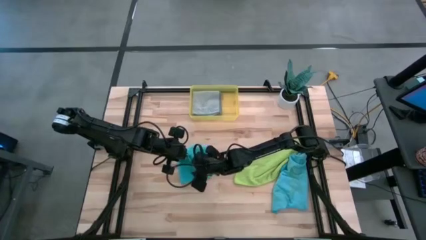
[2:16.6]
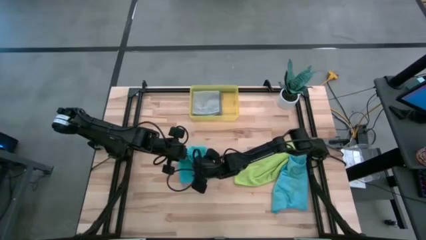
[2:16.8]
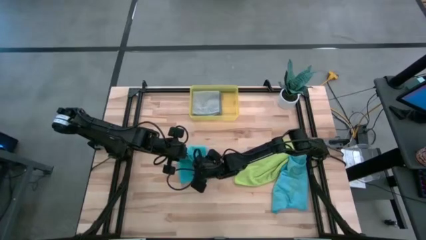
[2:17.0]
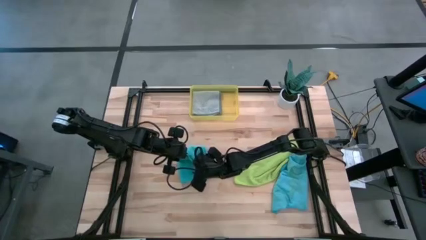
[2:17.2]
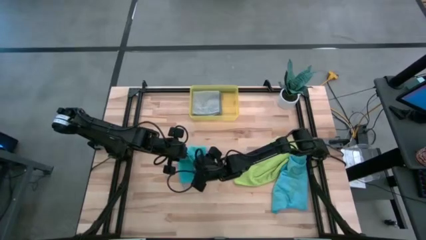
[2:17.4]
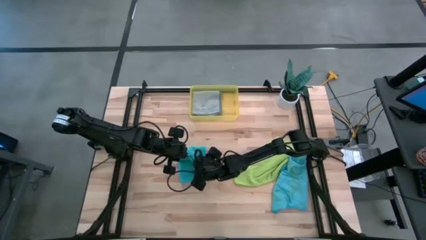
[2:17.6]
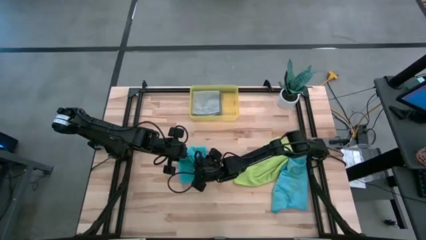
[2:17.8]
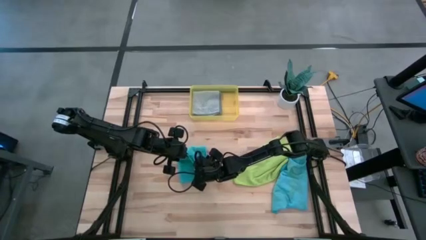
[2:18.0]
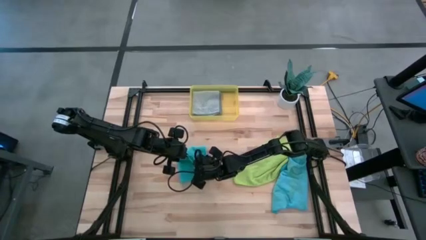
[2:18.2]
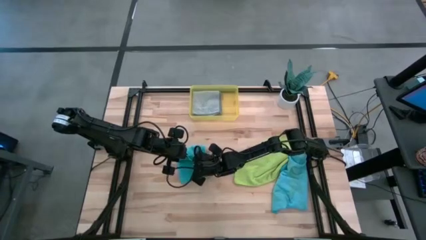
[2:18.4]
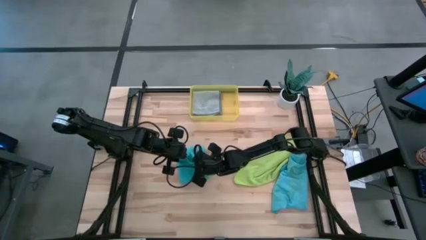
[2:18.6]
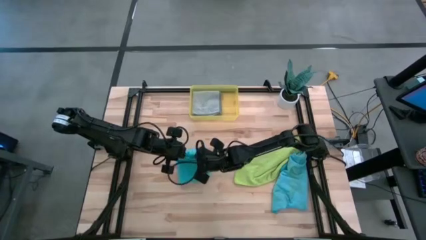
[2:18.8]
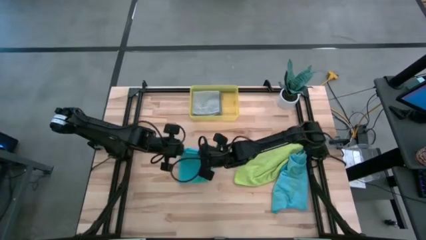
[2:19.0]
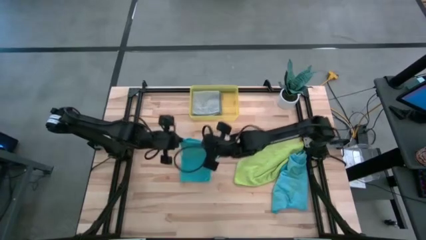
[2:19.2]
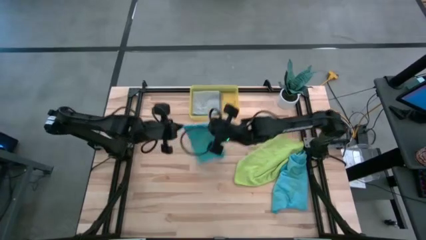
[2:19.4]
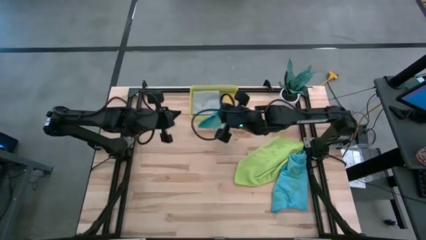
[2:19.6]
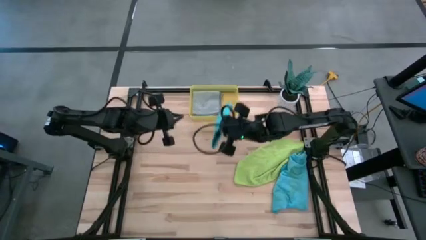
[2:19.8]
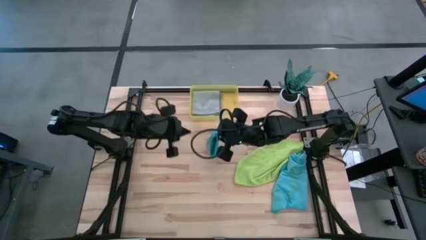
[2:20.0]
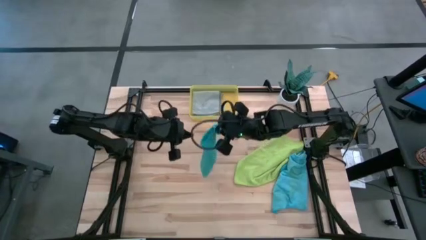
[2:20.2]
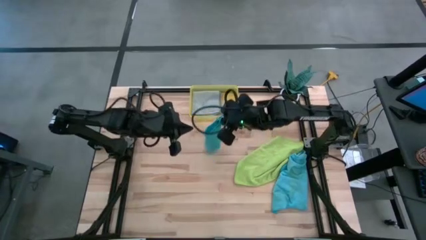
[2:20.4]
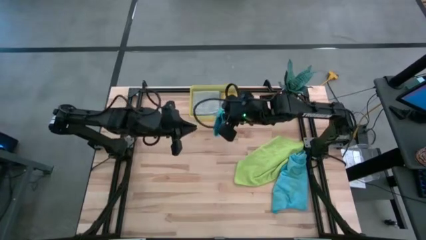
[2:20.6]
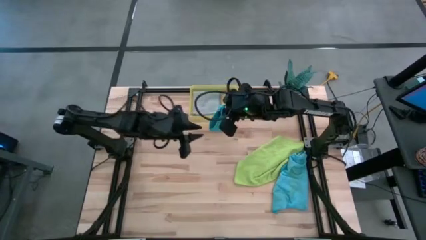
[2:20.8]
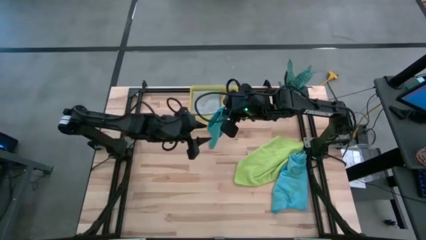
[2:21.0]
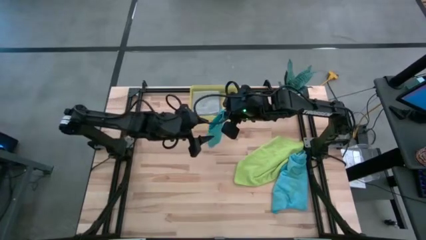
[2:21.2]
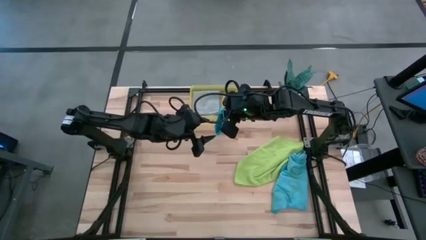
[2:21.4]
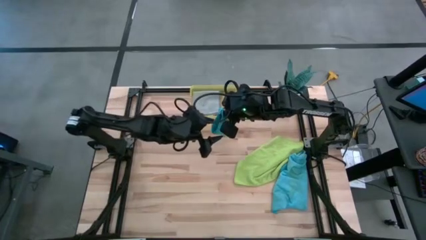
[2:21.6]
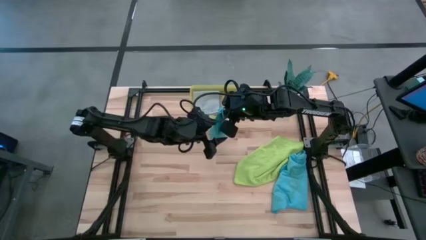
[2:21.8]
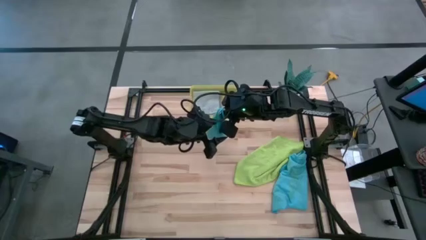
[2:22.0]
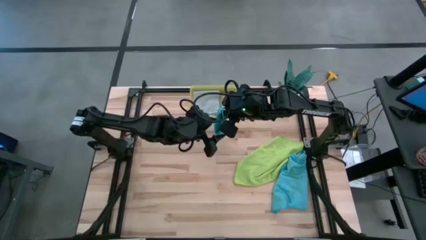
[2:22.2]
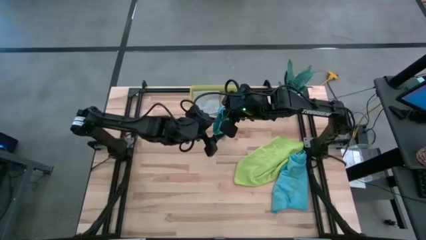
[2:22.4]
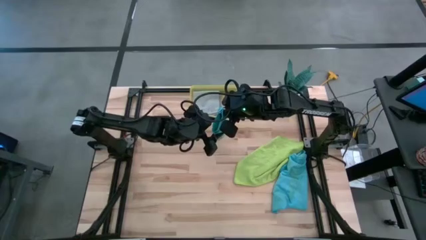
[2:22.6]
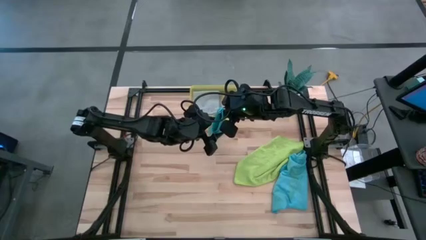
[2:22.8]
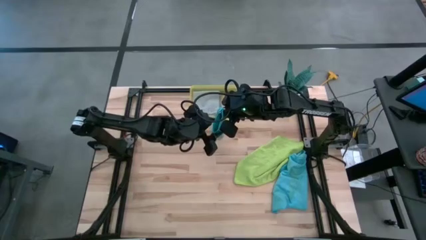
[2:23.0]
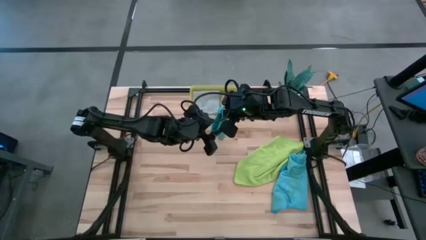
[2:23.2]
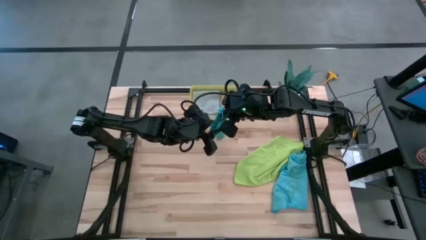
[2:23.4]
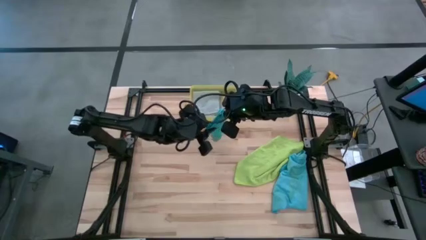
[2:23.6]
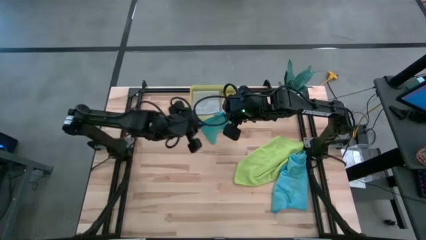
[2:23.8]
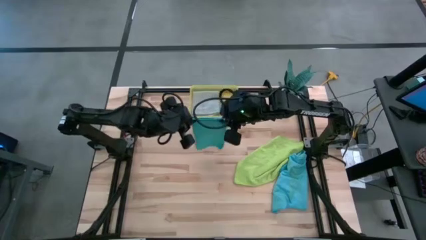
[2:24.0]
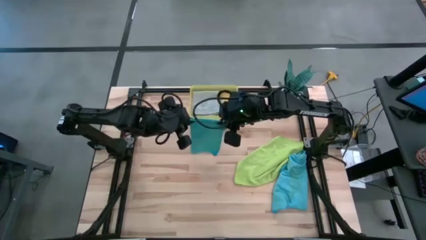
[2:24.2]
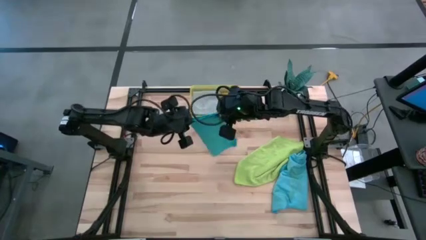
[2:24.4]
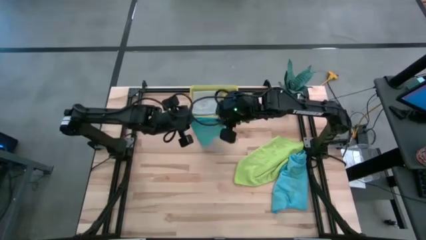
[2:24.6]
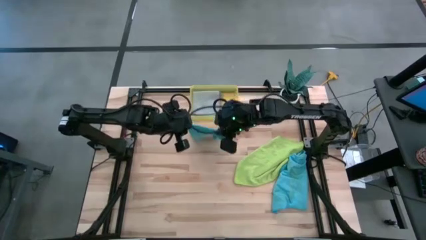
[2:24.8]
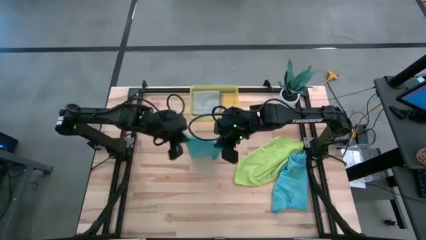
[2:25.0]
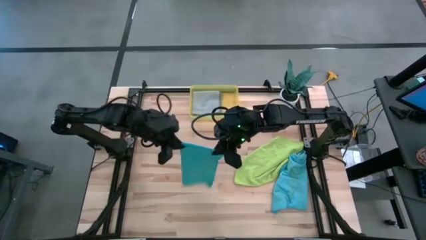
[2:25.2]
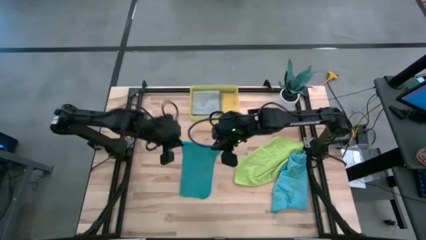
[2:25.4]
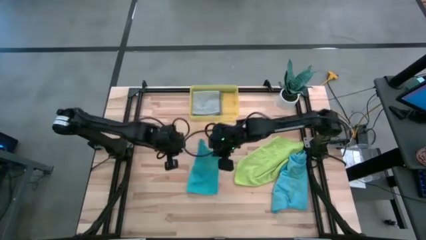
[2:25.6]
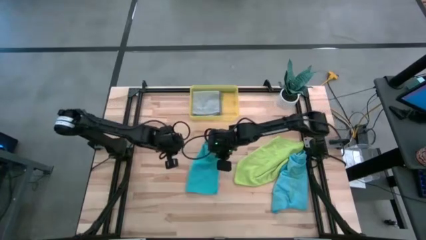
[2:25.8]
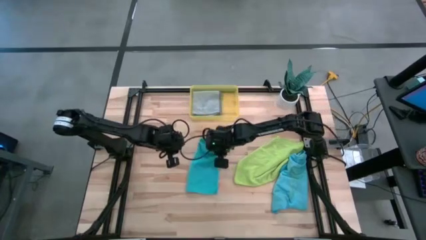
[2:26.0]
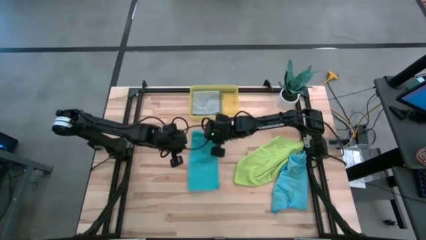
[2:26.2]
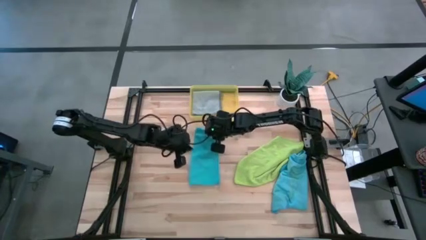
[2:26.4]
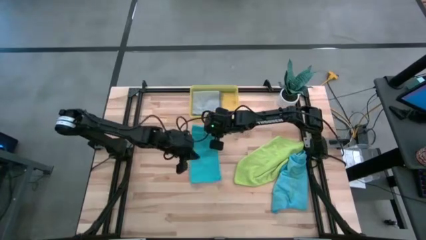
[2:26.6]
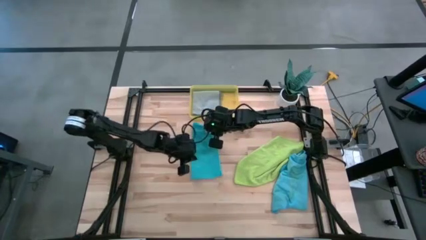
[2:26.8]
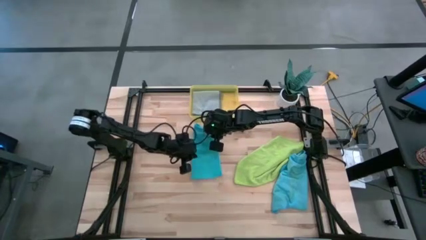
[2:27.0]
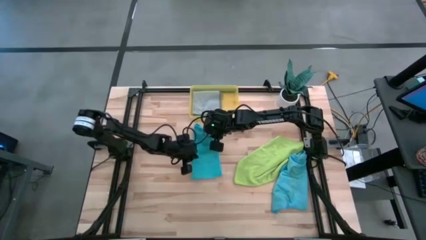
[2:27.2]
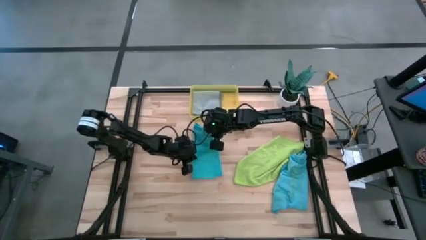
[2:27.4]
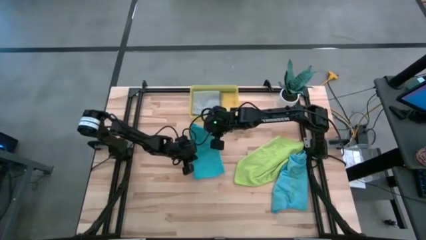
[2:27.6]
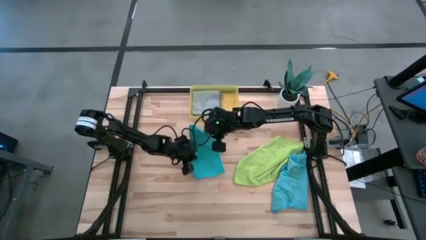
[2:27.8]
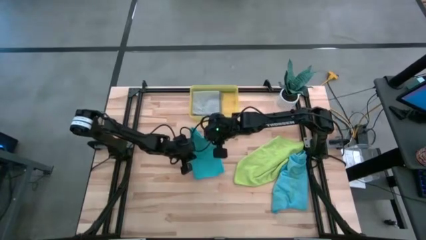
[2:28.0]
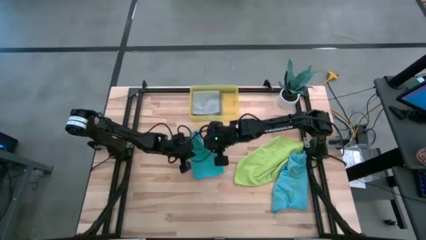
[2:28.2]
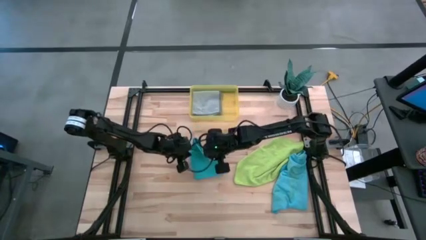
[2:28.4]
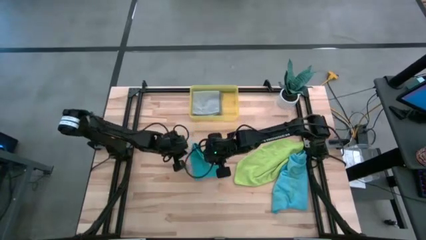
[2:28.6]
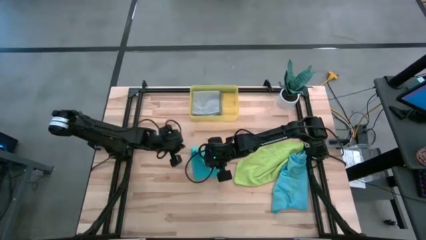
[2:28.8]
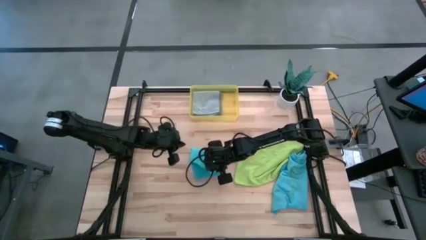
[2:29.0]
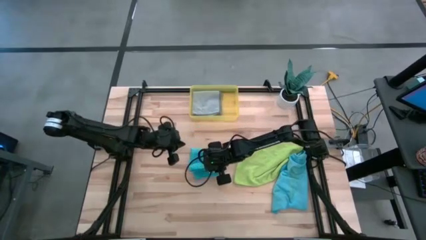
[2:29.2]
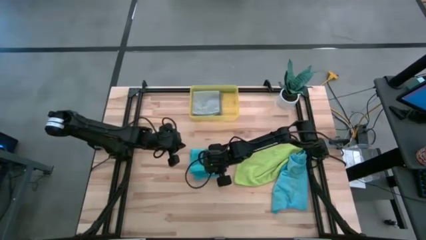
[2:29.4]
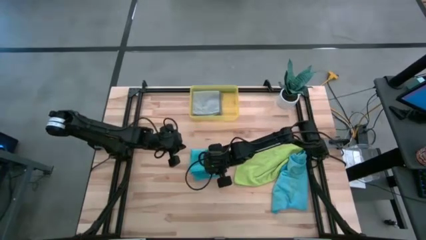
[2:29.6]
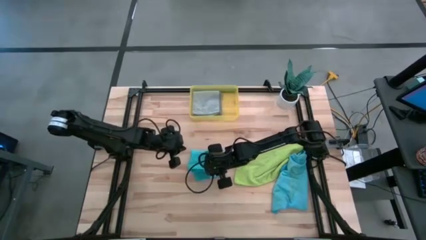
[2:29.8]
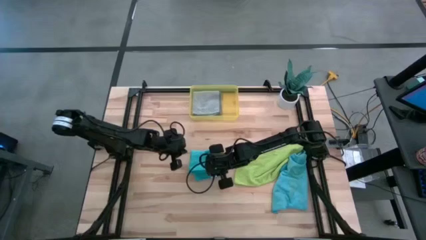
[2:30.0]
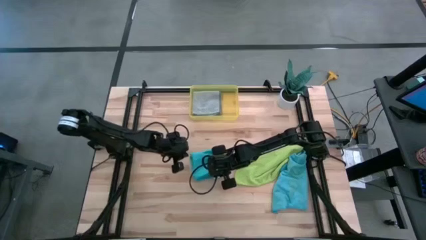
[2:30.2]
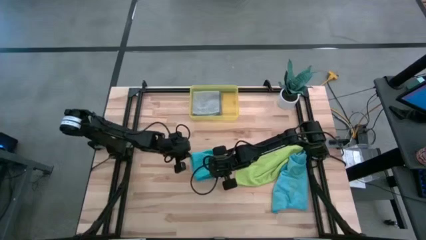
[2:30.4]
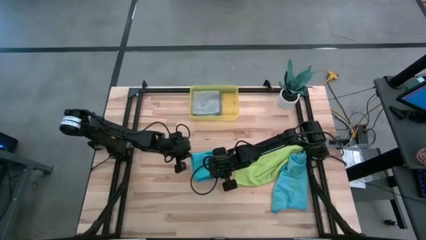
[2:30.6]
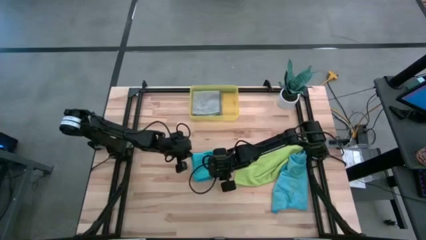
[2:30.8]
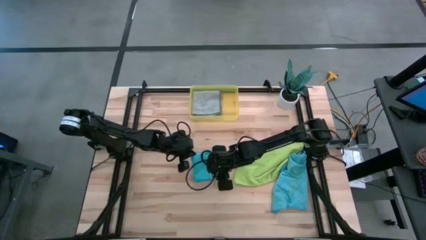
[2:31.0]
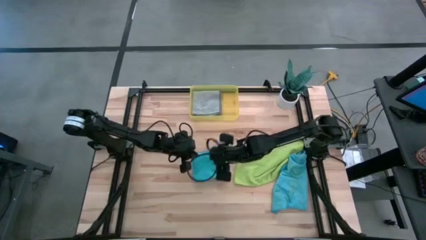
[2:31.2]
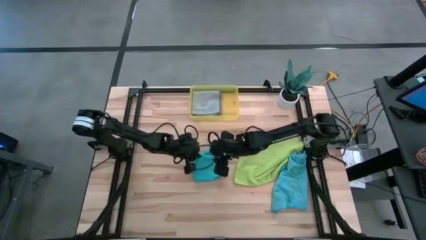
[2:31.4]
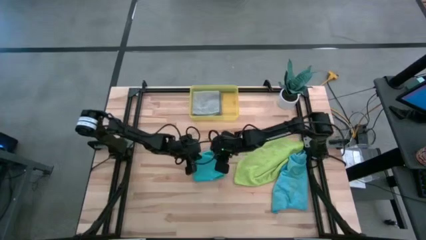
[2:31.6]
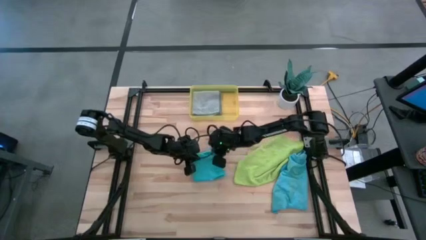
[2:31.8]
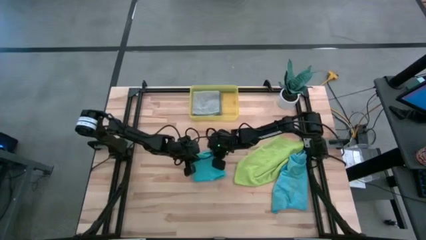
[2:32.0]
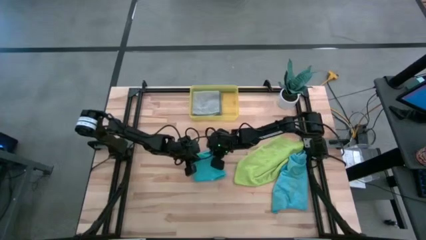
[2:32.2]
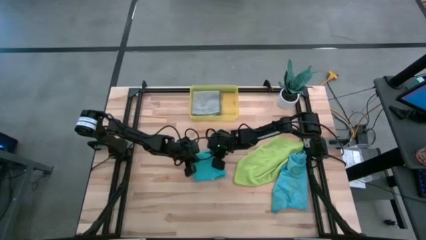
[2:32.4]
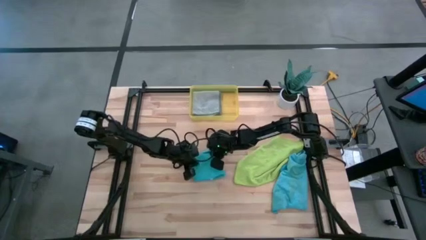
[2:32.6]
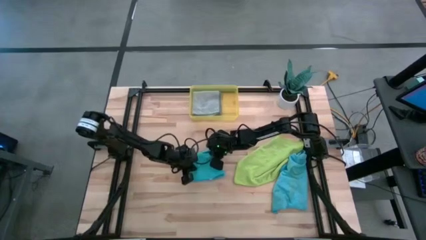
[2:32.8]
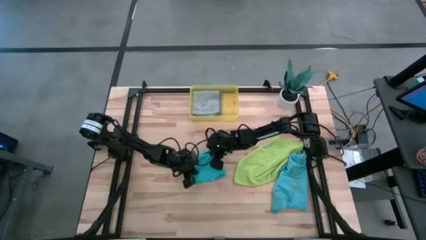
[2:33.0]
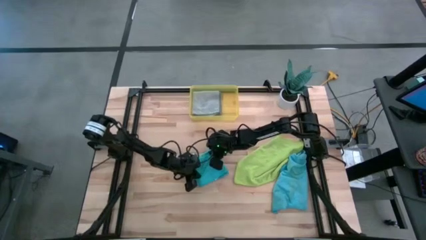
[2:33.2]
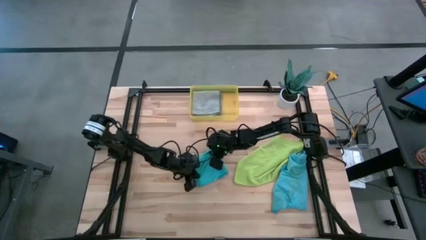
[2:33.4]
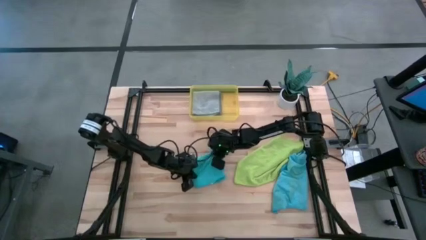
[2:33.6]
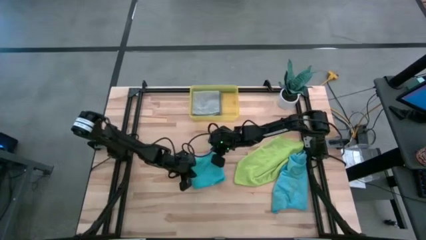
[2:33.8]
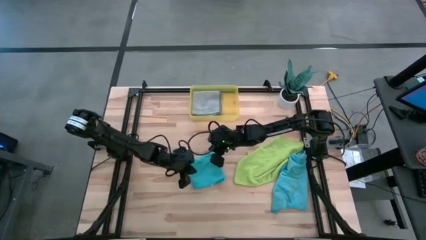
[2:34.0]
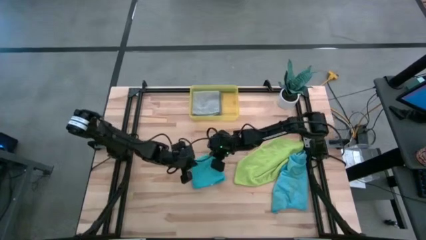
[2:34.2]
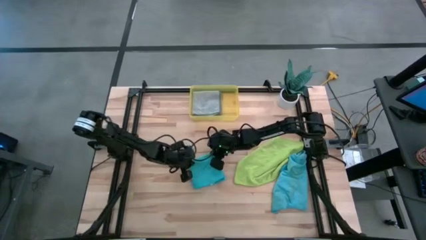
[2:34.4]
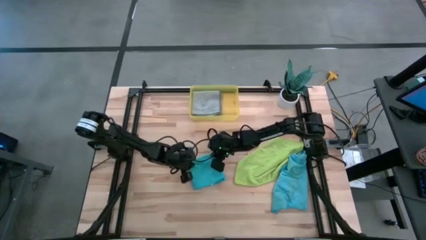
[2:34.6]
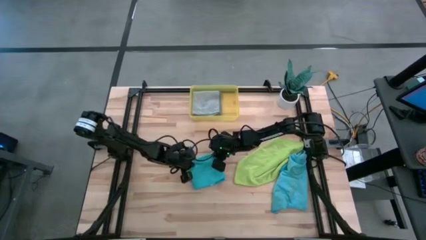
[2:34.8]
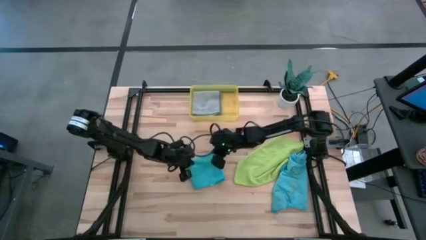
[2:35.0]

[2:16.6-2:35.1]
Task: Fold microfiber towels
Fold the blue microfiber cloth
